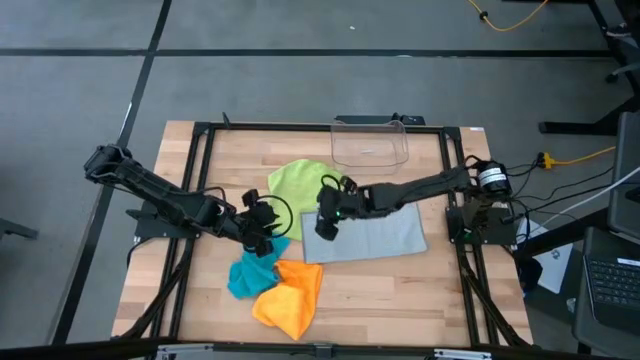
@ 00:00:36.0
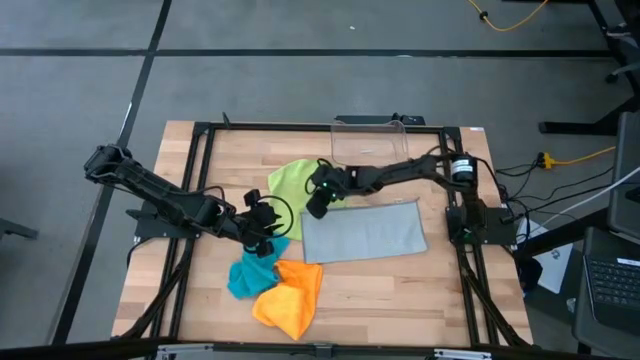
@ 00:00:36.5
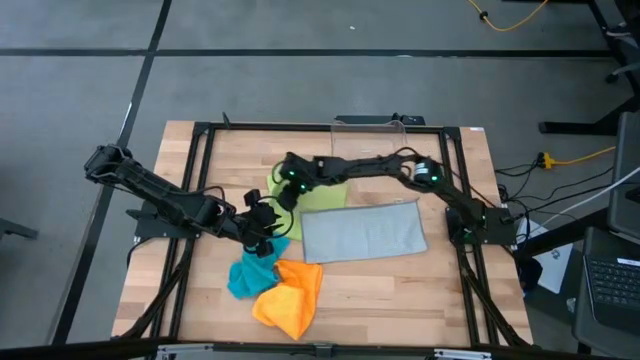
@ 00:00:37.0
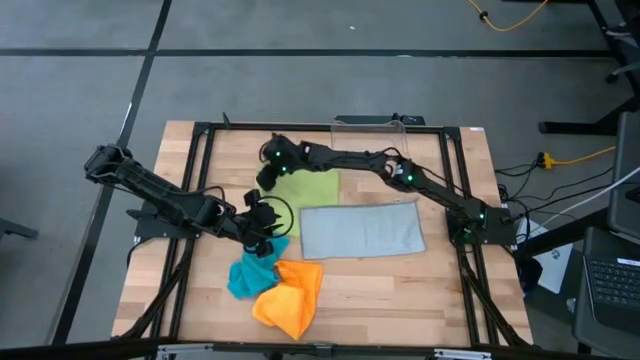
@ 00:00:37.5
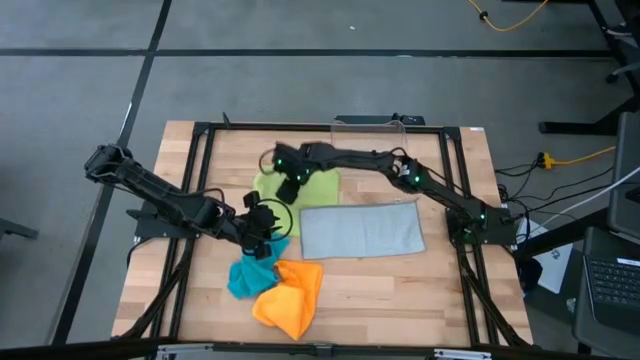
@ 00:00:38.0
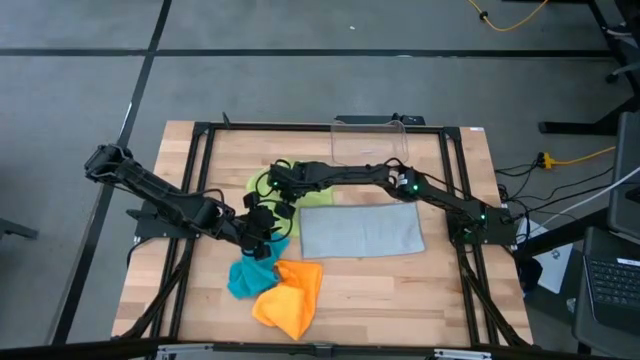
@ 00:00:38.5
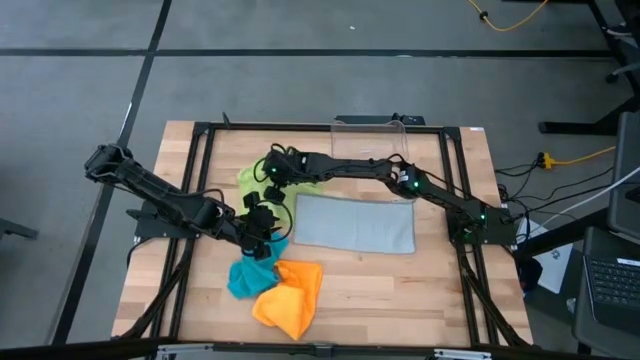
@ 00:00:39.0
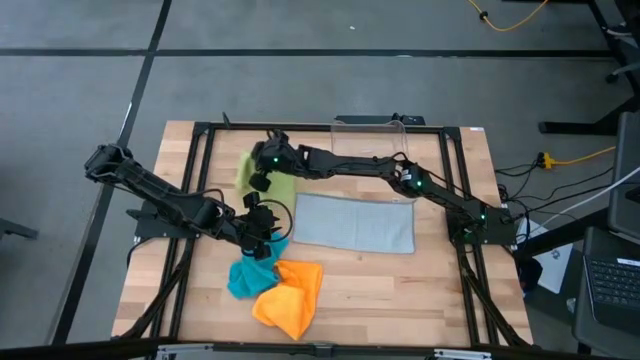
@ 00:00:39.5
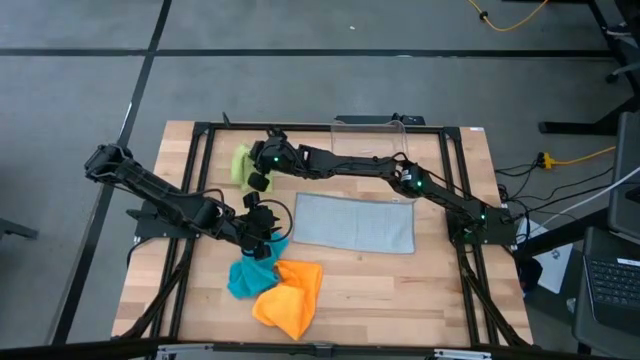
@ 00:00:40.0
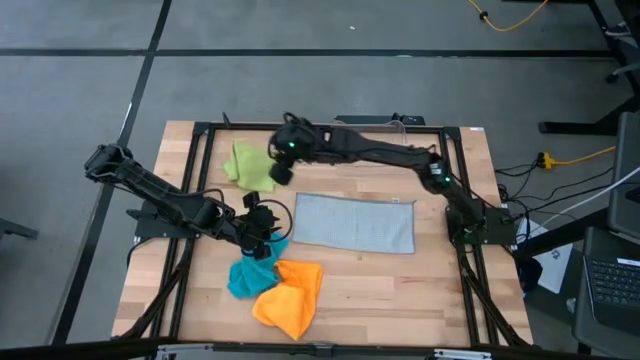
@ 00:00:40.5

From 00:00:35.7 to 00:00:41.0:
Task: Fold microfiber towels
Move the green microfiber to the top left of the table

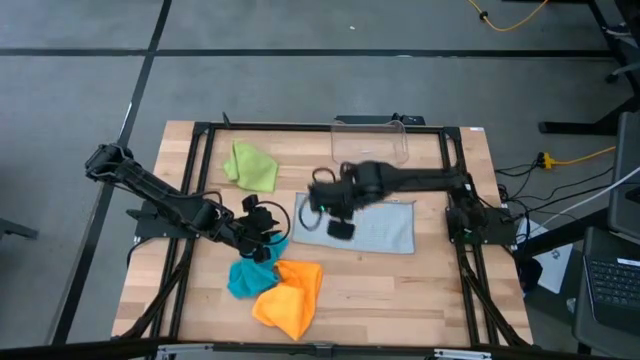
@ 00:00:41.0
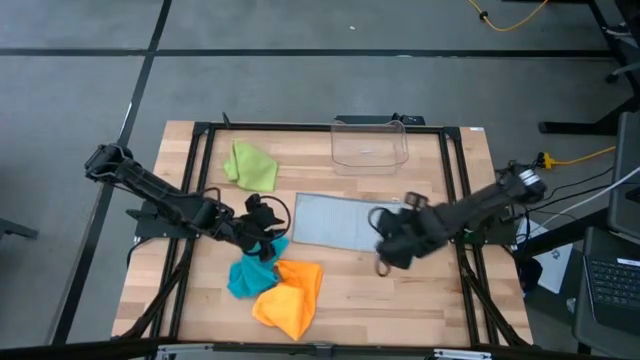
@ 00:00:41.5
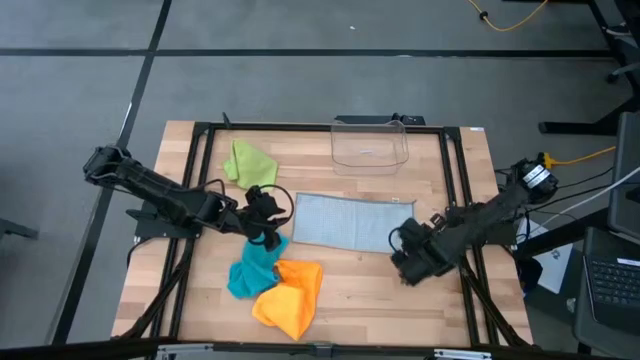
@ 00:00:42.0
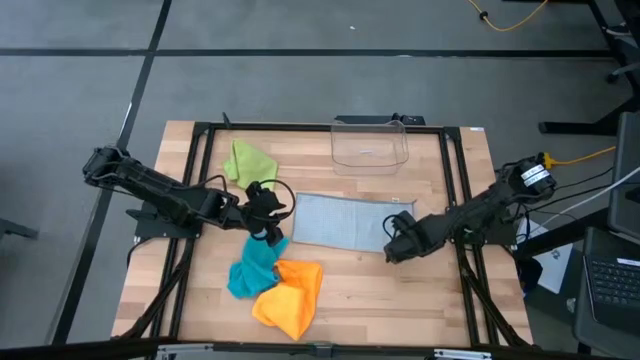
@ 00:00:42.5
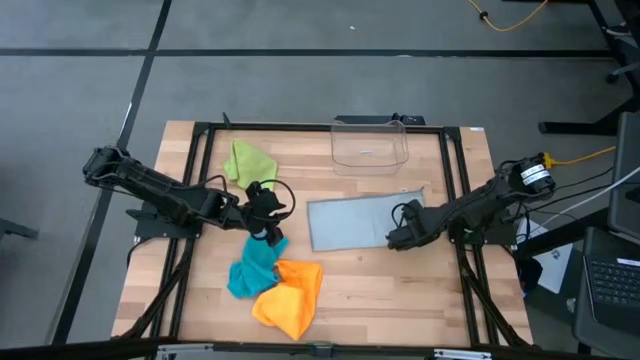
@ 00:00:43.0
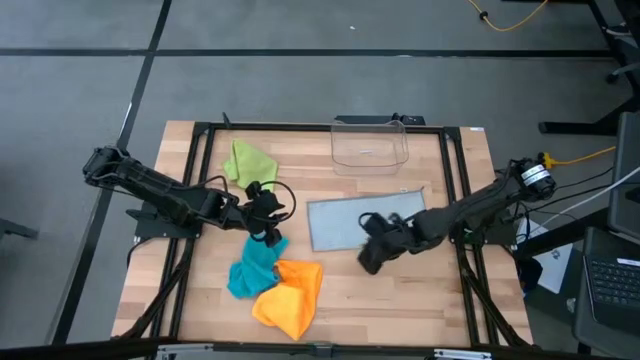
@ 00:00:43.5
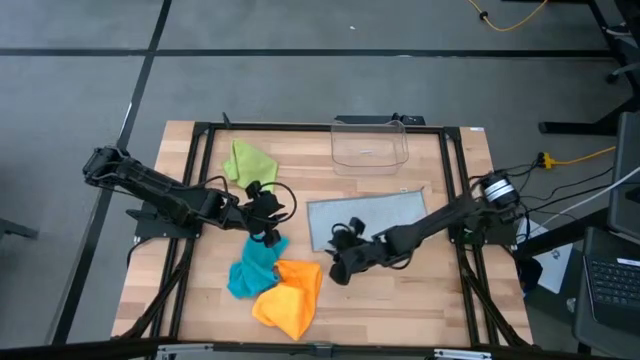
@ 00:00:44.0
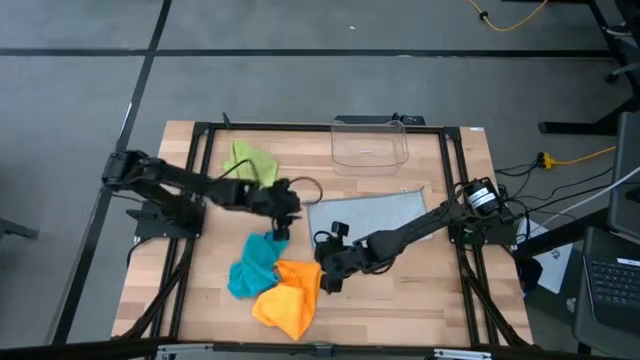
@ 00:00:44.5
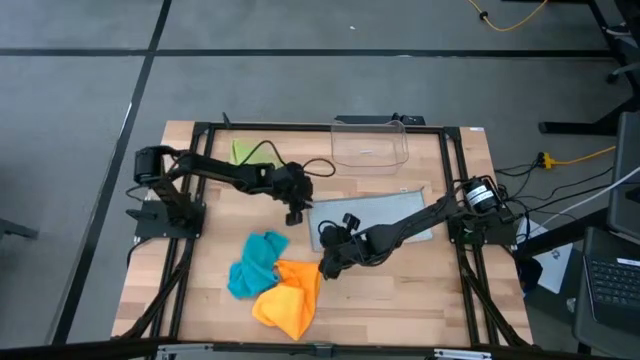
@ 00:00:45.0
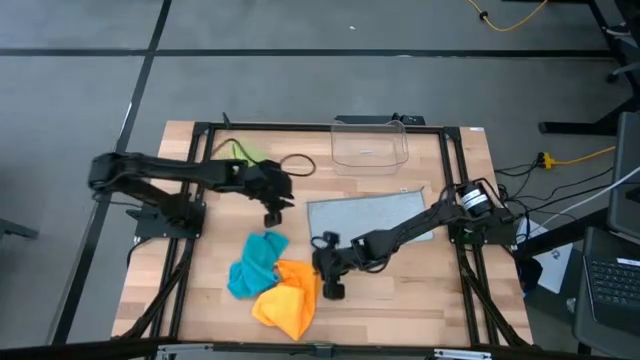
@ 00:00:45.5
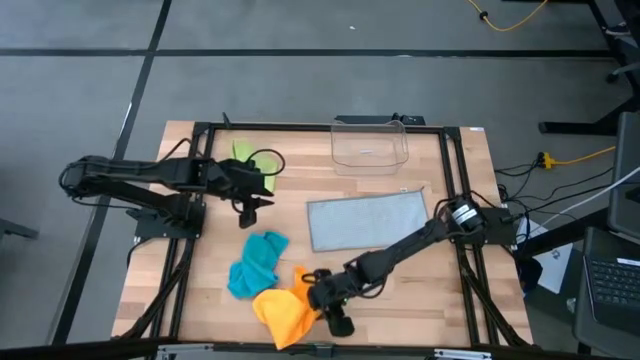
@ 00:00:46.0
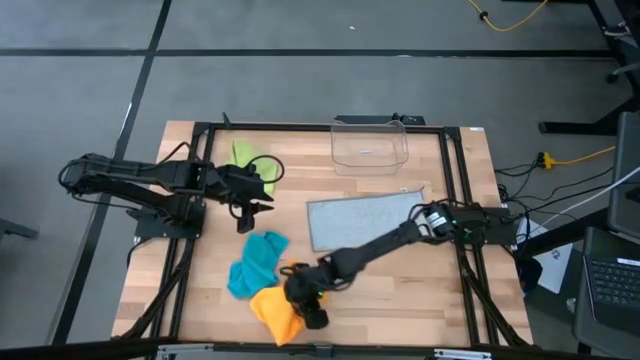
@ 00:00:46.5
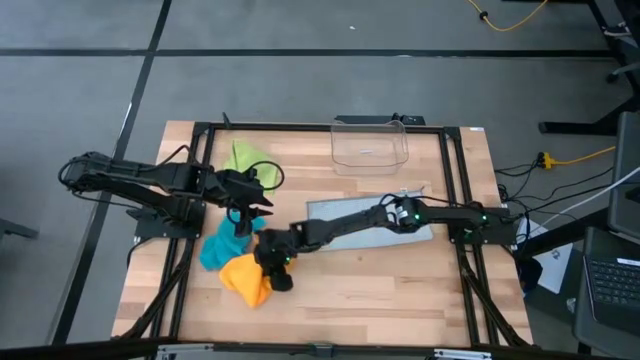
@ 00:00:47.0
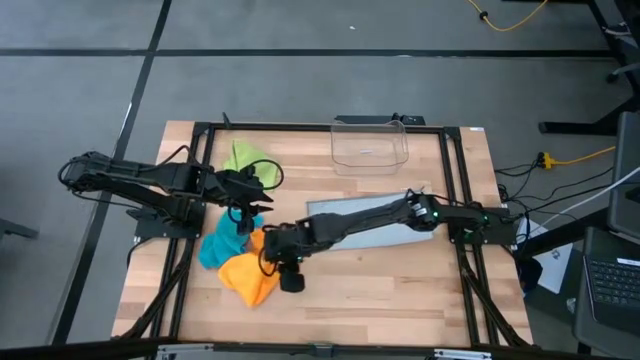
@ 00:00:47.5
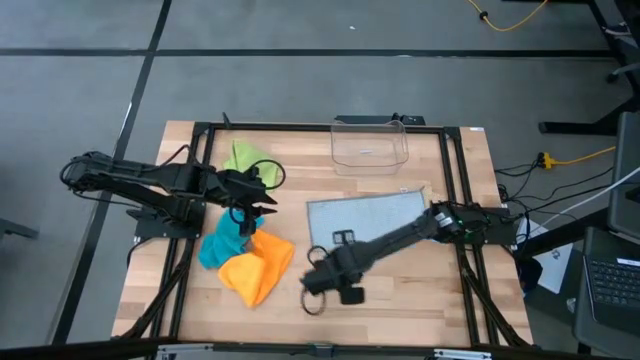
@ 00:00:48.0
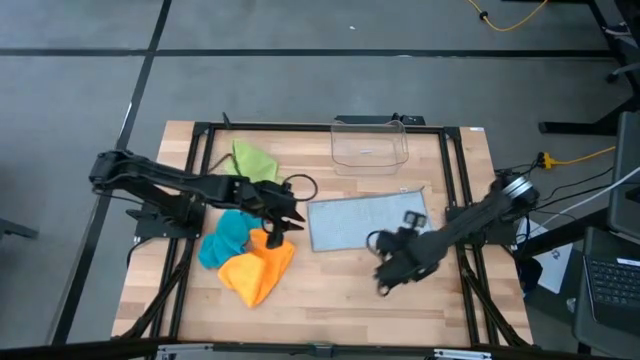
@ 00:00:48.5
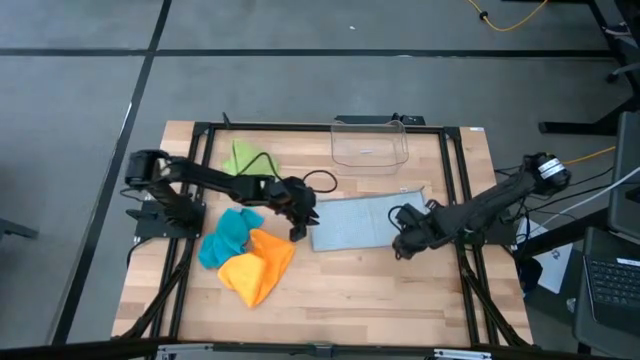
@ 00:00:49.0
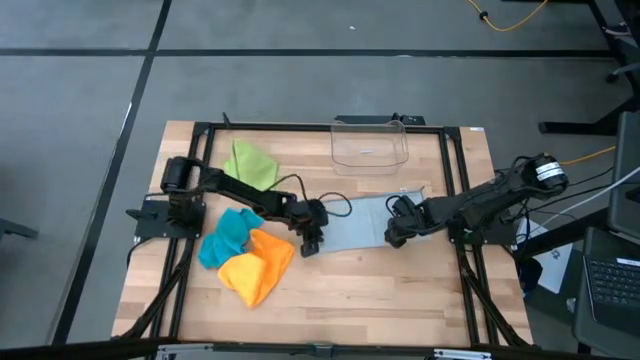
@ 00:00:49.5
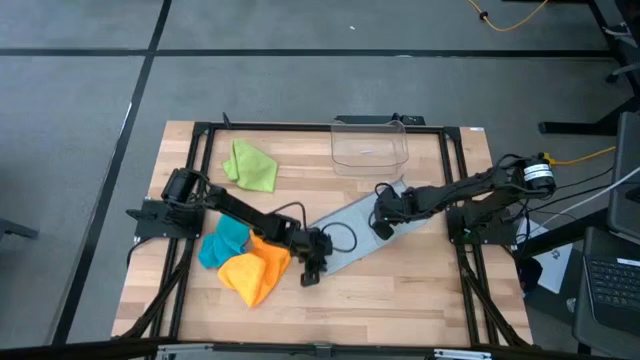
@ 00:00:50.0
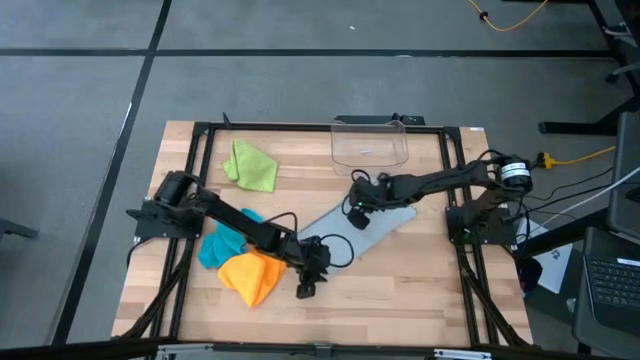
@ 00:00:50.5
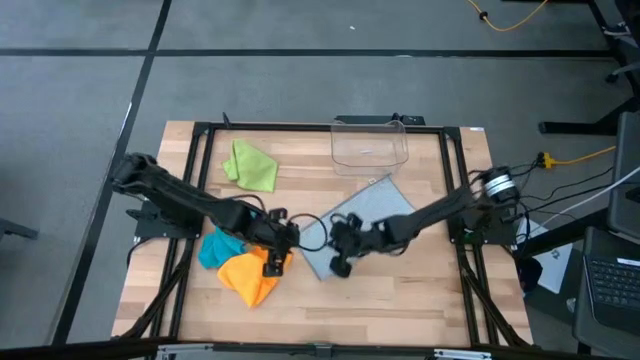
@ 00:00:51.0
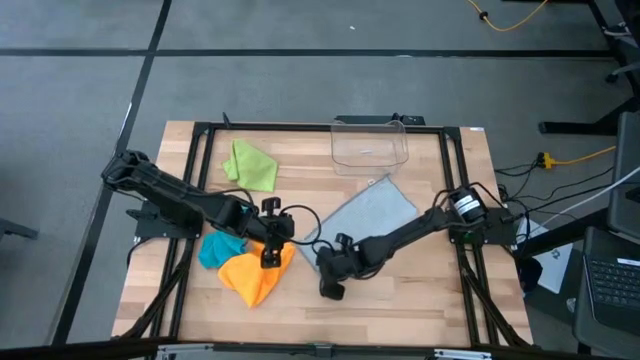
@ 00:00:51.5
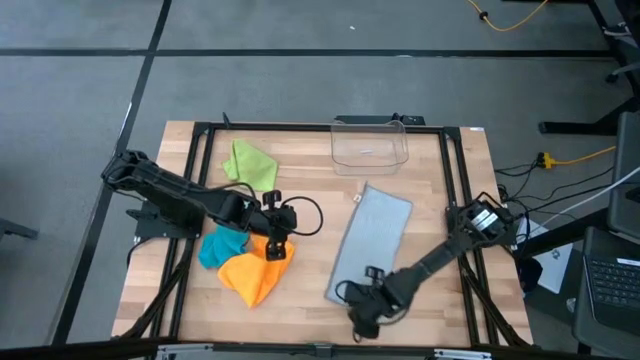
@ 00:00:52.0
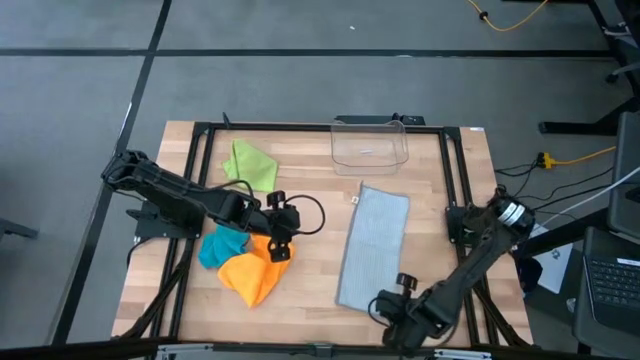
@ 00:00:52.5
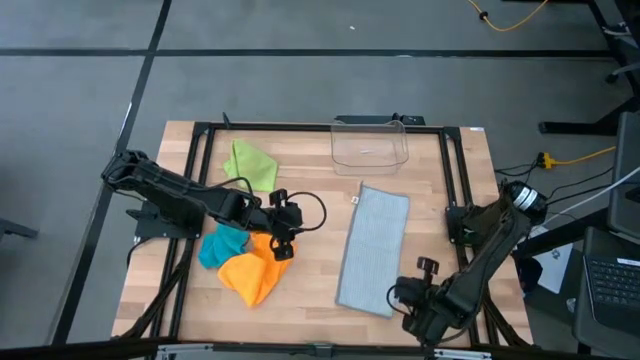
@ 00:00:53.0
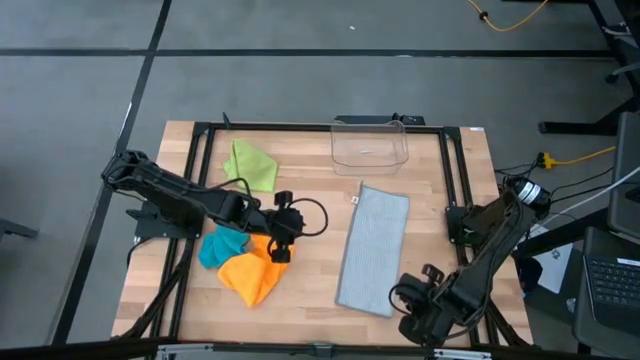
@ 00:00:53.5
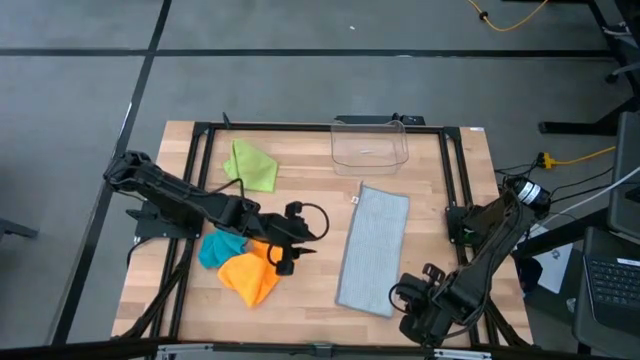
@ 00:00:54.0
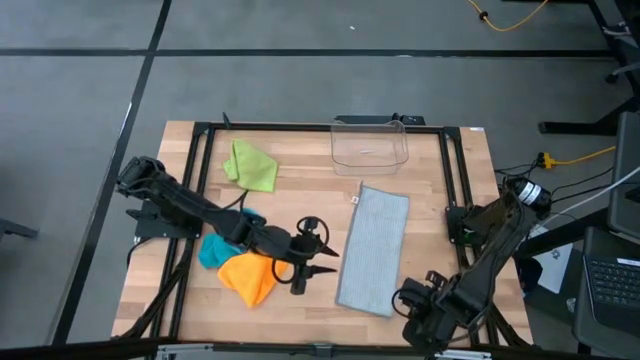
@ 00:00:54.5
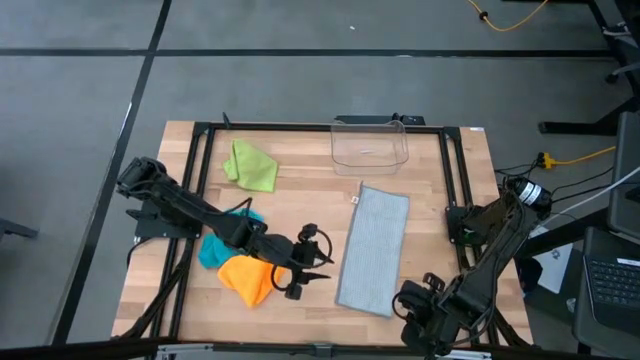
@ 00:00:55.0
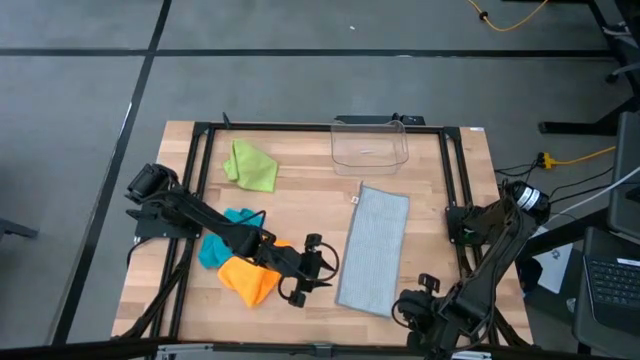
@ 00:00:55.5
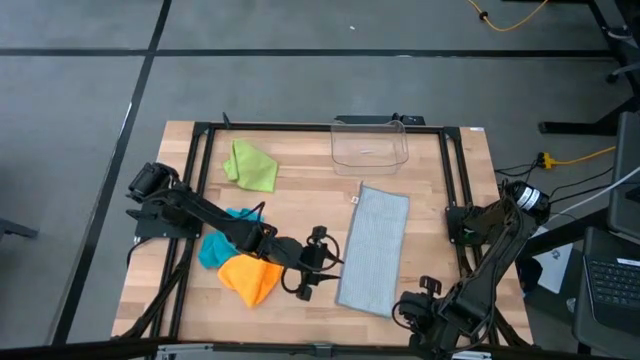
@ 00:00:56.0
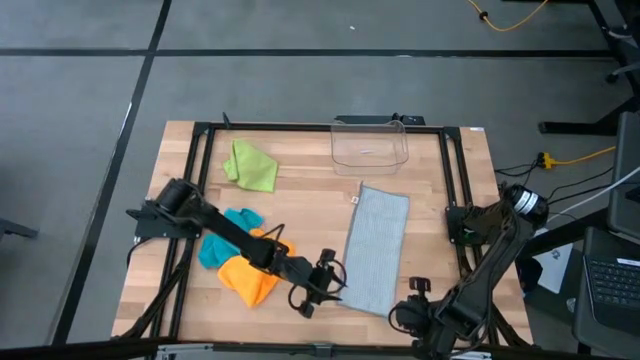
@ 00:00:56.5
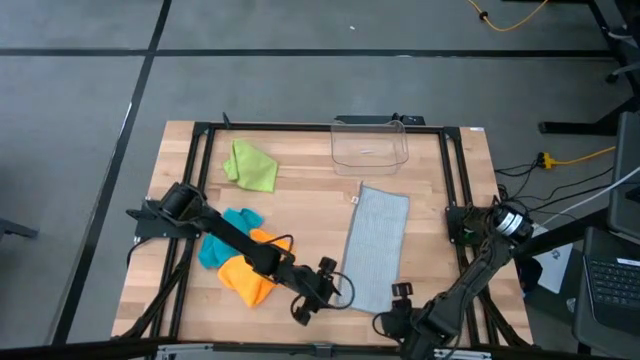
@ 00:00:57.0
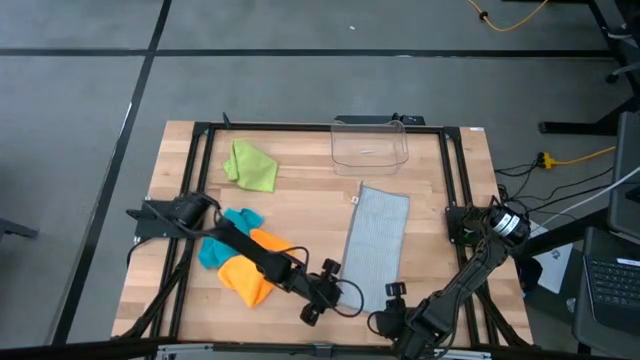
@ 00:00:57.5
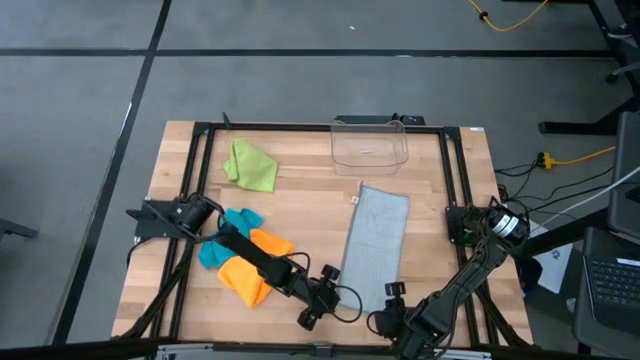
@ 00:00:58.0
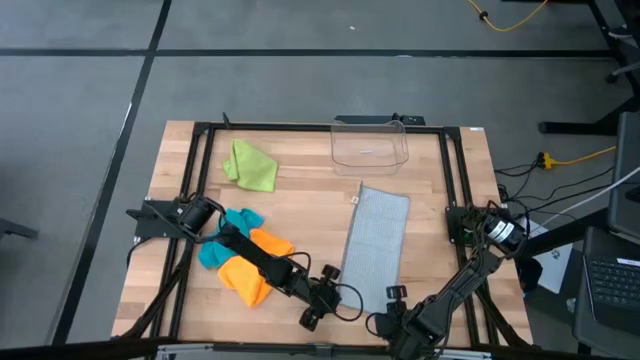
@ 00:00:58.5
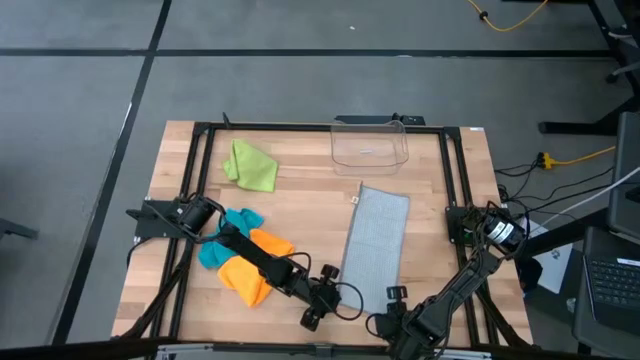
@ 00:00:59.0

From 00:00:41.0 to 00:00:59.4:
Fold the gray microfiber
